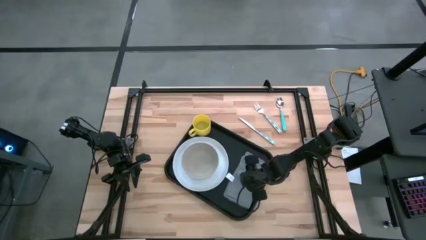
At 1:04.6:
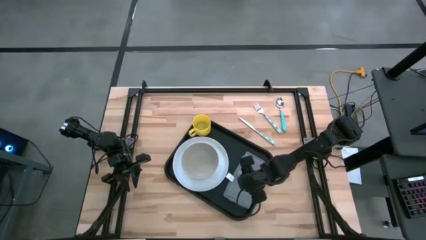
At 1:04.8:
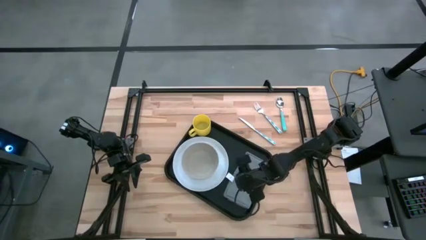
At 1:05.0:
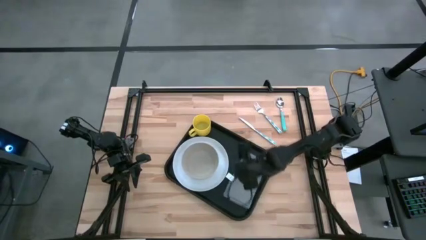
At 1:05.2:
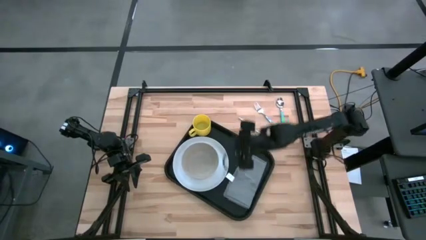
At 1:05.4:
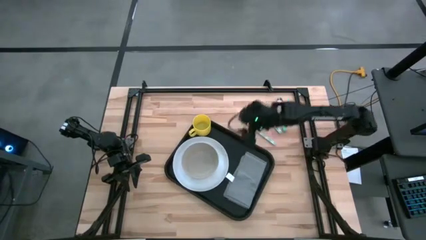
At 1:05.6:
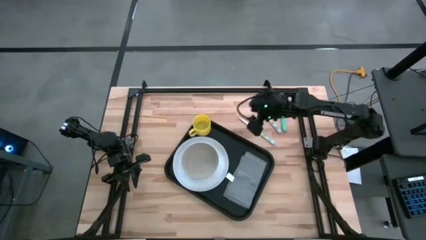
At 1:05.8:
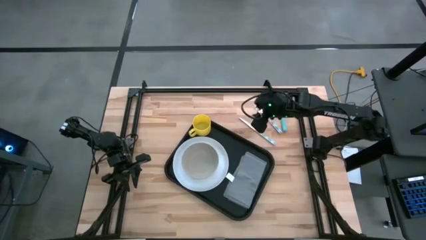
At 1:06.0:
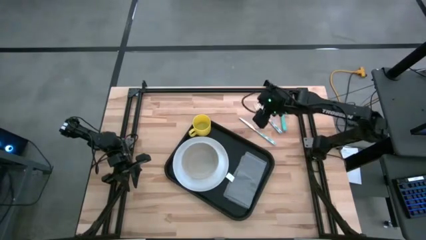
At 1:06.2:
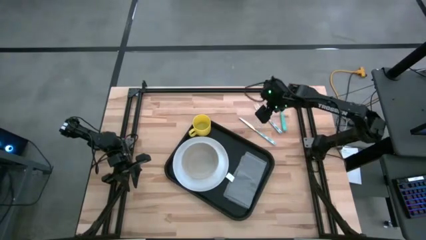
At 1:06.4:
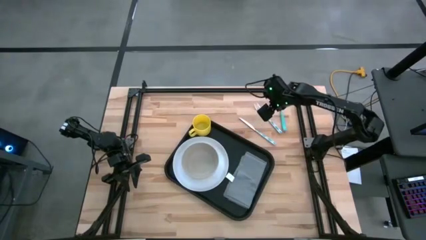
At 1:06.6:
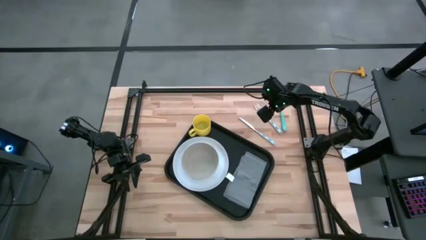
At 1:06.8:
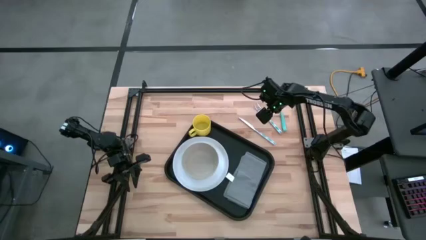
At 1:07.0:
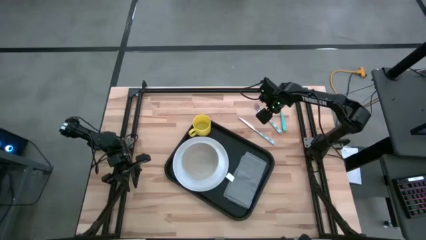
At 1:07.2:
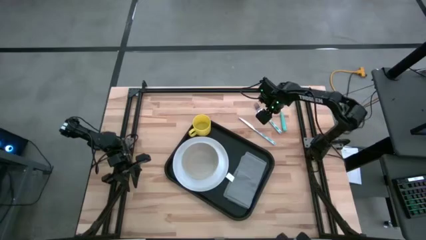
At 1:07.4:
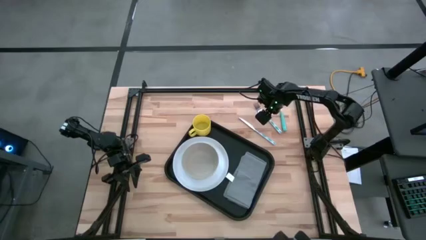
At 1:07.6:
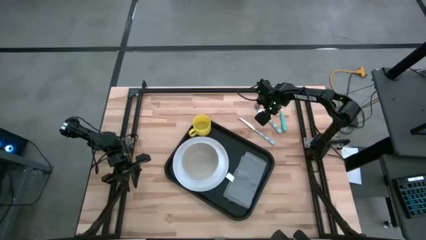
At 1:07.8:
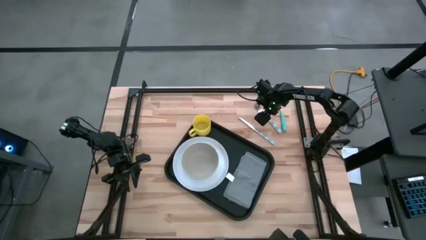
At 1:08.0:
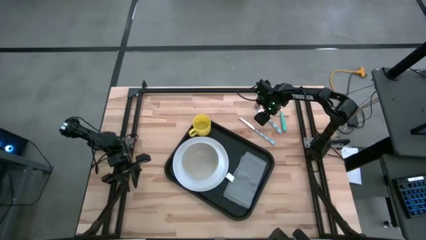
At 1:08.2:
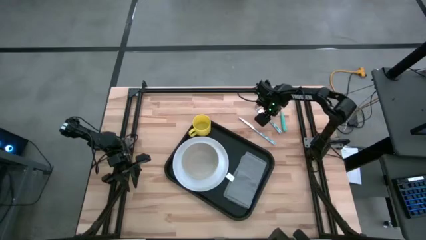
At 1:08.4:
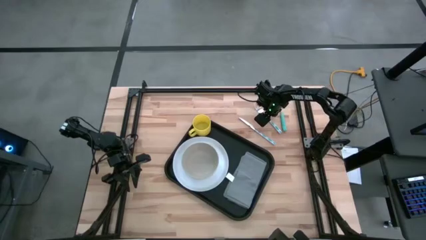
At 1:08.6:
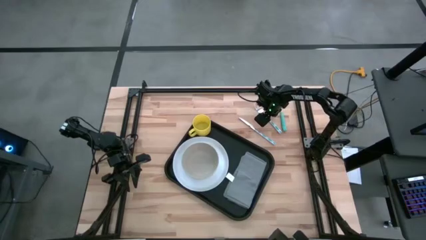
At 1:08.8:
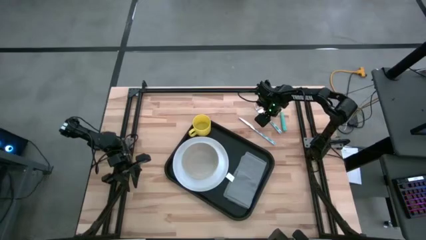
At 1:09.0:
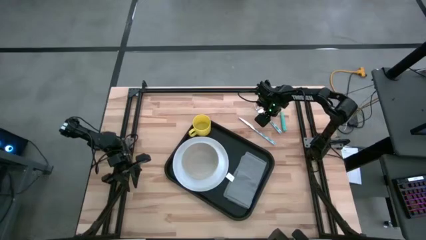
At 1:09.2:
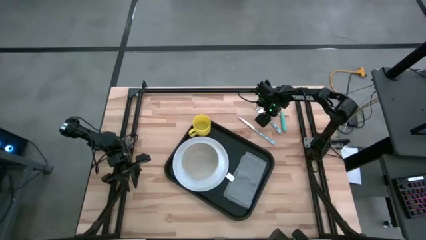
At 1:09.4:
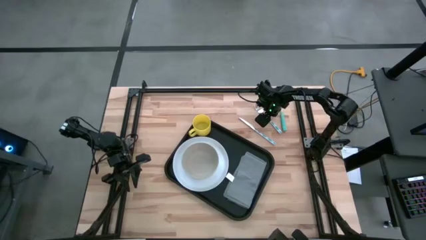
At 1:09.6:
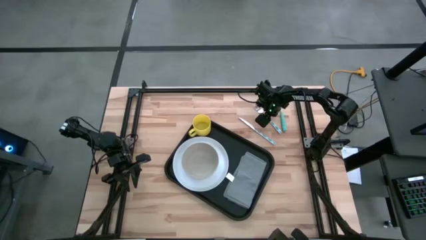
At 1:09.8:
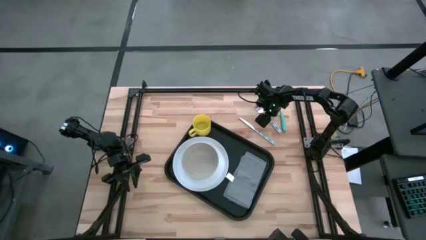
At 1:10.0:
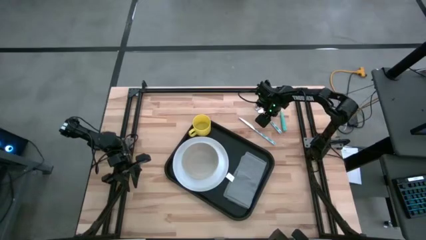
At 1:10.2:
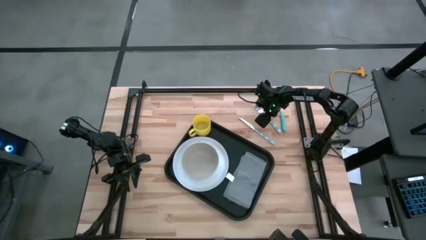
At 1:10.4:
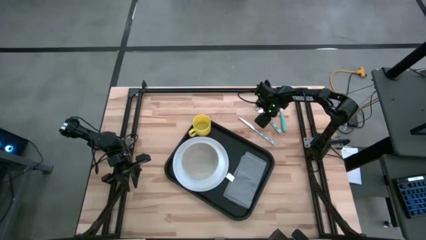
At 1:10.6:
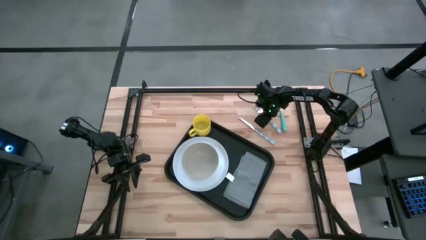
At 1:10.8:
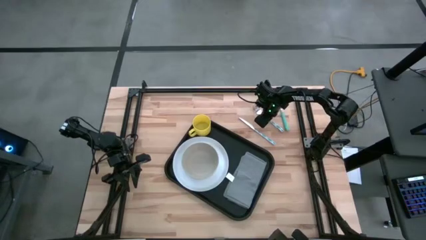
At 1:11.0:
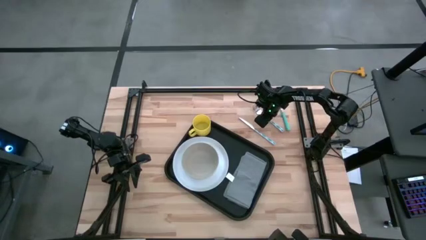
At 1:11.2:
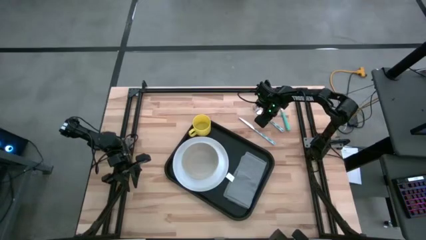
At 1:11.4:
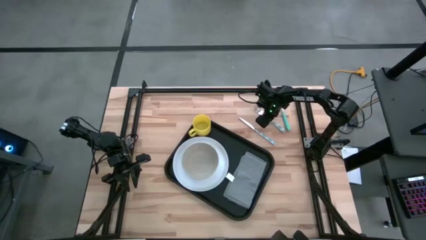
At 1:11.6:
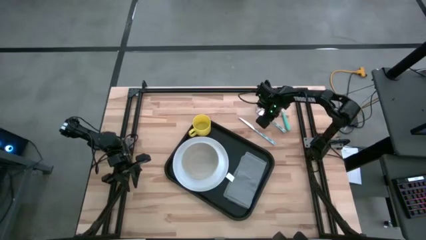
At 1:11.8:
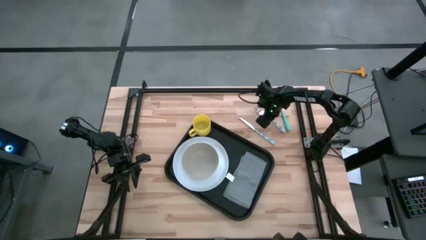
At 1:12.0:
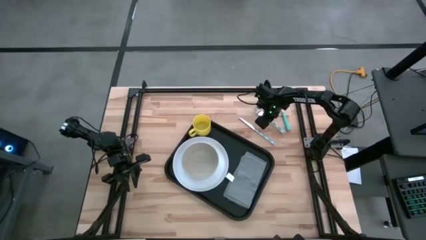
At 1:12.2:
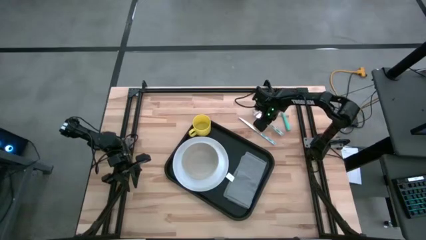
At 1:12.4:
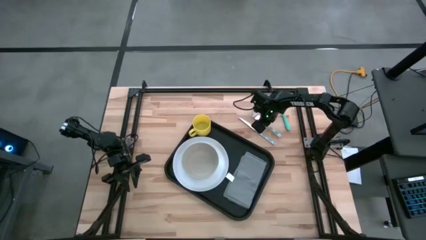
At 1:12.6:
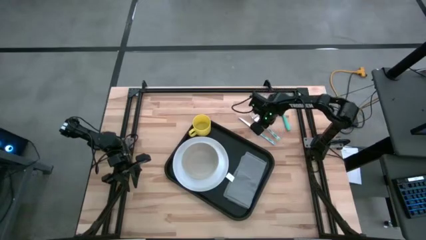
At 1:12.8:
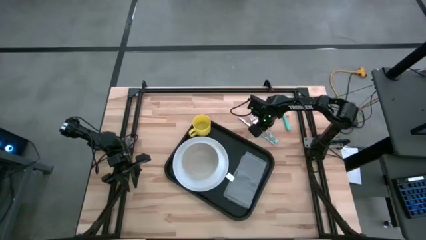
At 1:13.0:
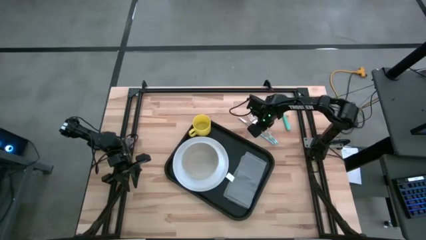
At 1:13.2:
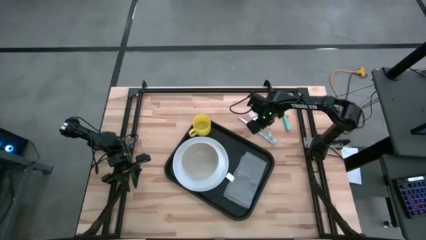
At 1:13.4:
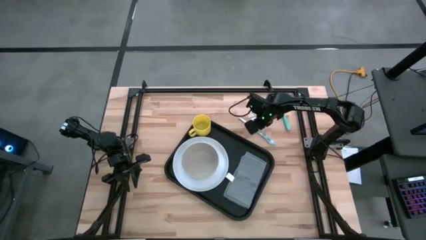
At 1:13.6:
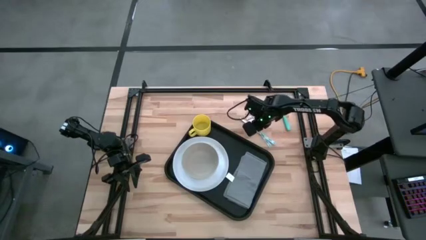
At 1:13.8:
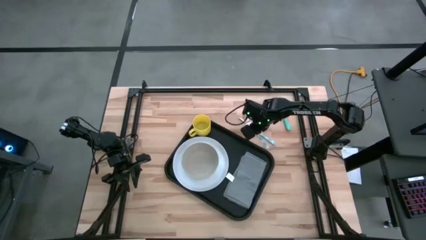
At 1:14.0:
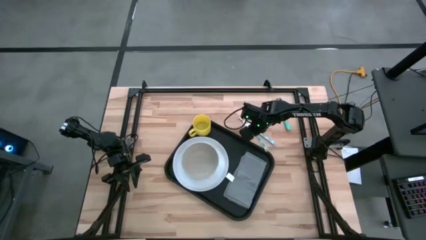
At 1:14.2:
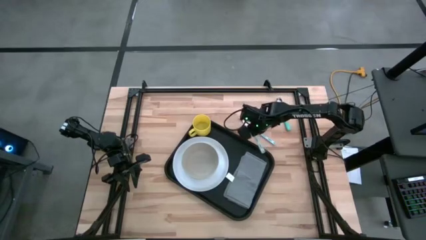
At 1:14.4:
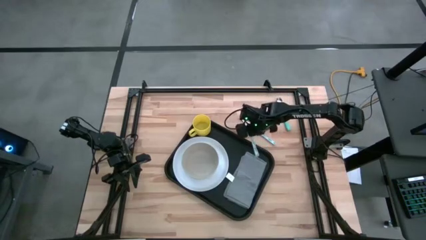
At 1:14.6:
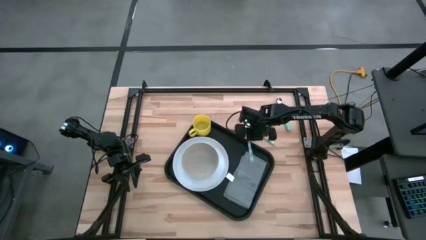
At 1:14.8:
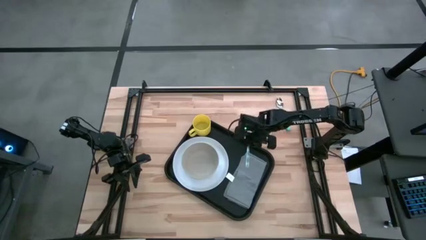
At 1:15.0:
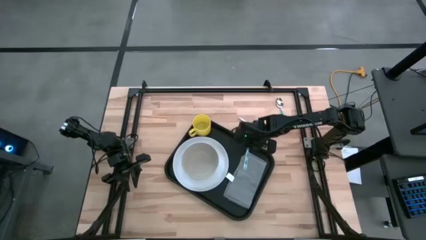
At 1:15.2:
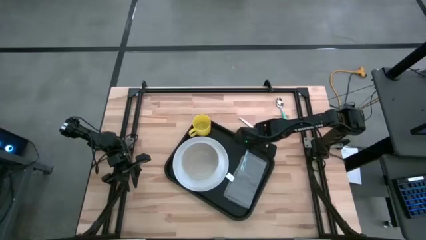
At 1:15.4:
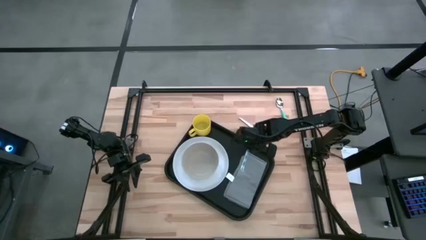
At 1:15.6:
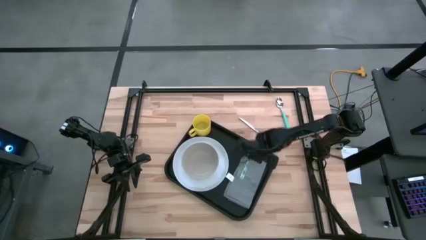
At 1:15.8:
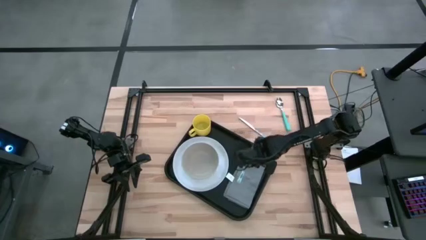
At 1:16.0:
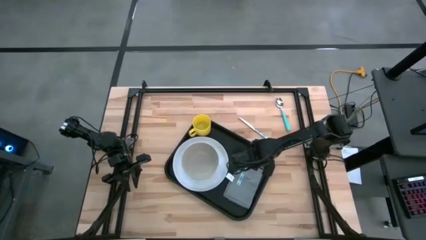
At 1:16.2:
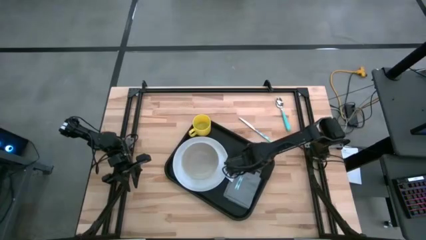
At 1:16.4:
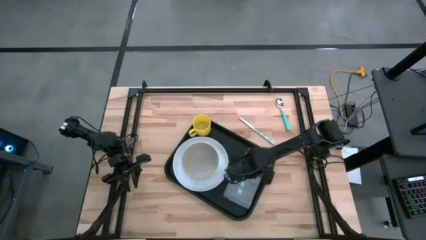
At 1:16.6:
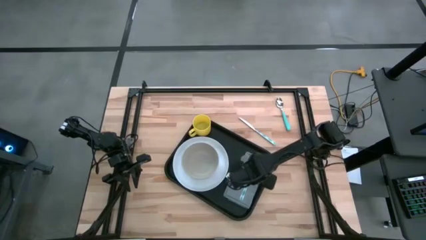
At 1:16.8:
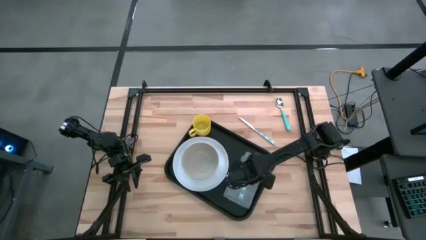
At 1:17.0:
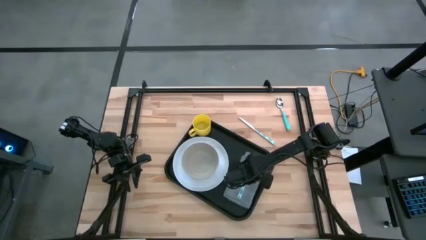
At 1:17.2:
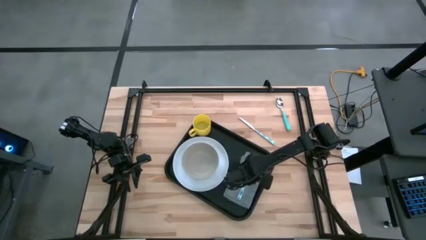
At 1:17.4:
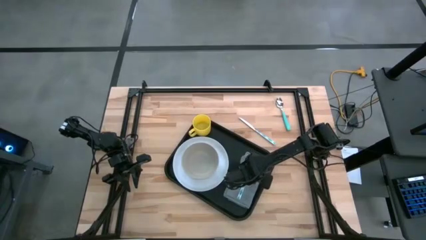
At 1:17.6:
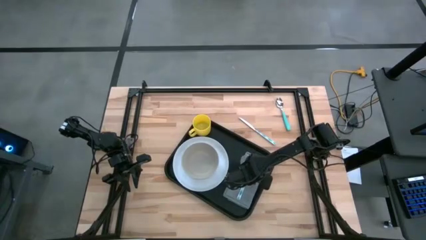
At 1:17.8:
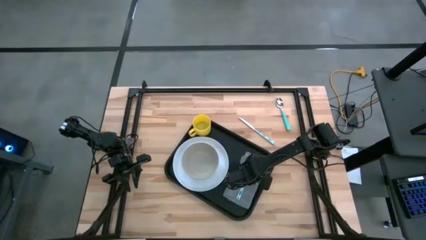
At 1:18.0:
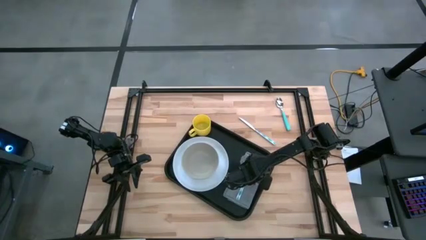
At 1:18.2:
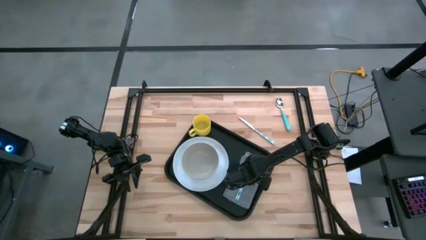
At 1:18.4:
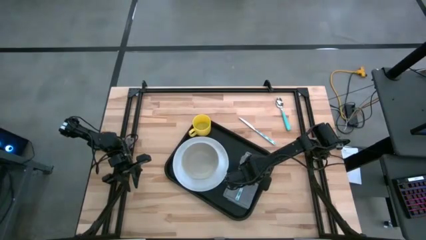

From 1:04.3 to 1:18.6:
Task: Set up tray
Put the blue fork on the gray napkin to the right of the white plate

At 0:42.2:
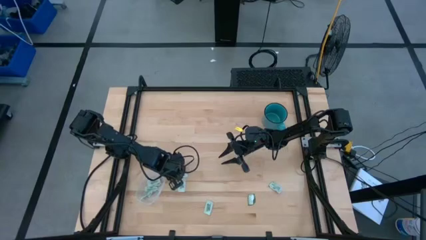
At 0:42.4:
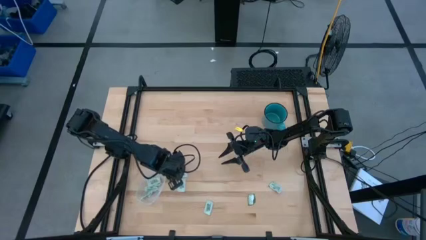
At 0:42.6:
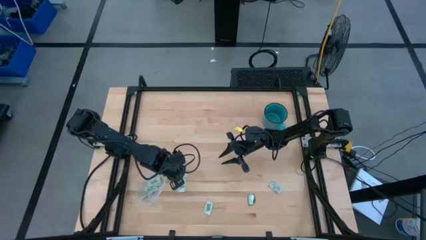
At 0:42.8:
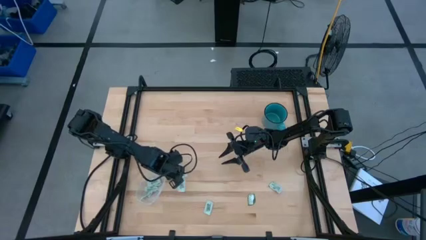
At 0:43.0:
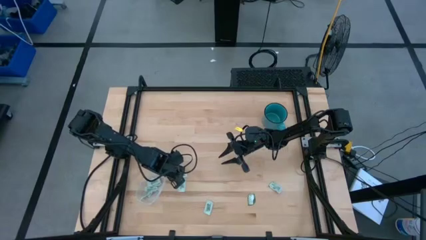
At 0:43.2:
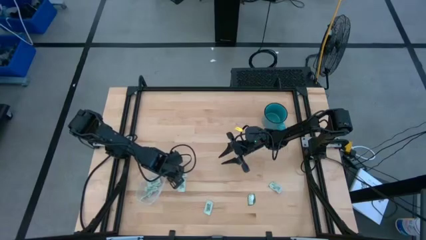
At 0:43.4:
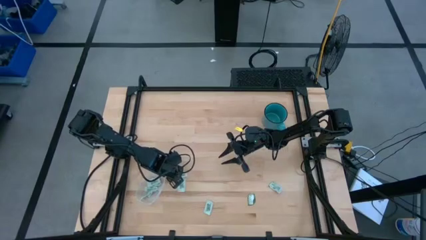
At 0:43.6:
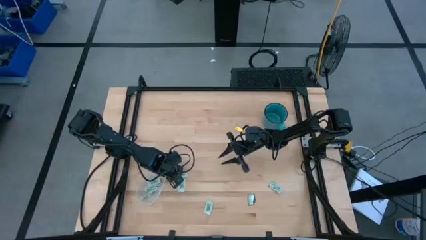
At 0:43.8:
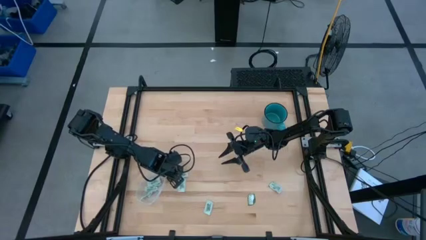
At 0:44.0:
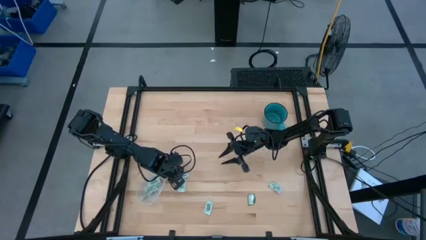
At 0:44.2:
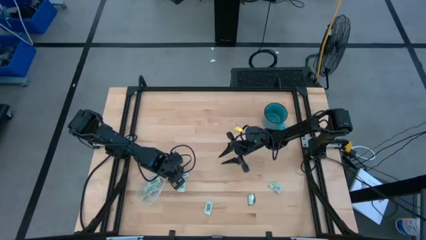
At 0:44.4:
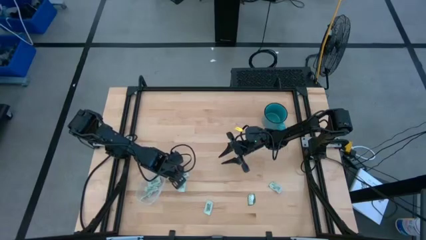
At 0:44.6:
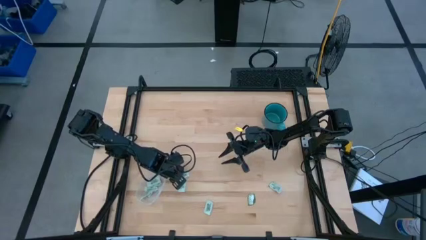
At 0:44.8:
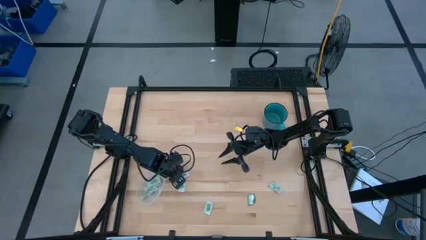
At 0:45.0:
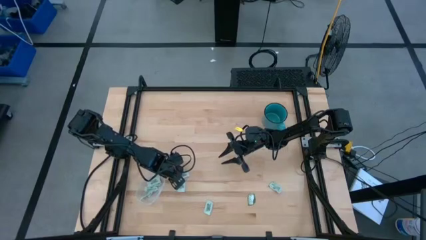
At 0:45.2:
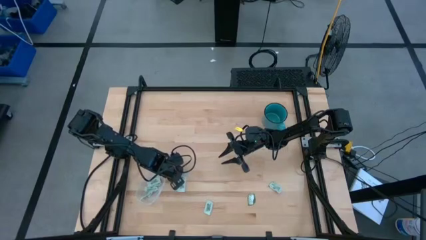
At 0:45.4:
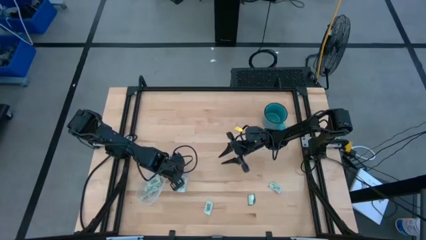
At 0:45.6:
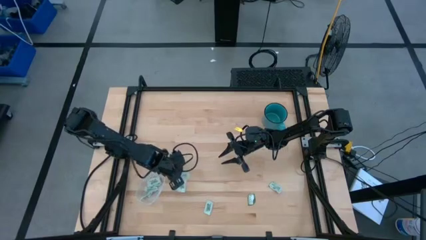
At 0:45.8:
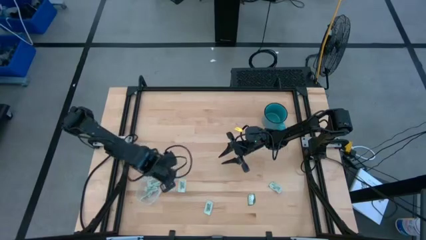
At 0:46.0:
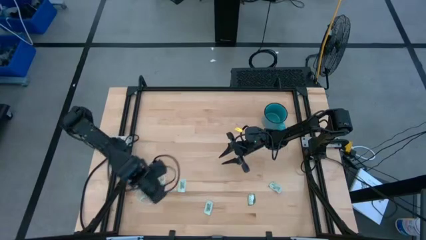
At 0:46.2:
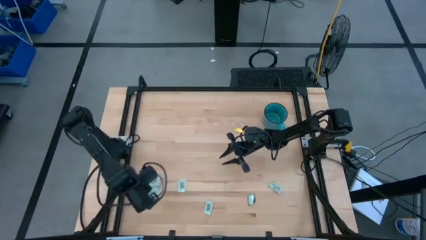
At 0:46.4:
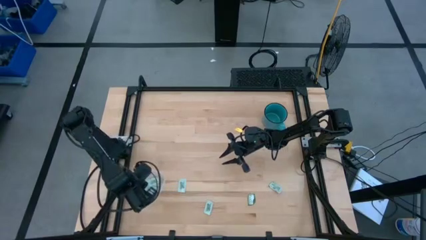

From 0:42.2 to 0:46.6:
Task: Pick and place Stevia / Truvia into bins
Put the white stevia packet into the transparent bin
